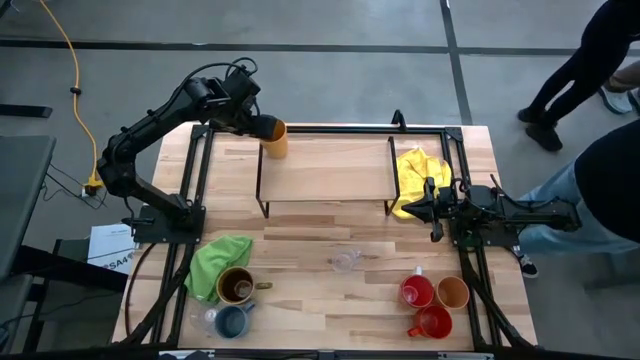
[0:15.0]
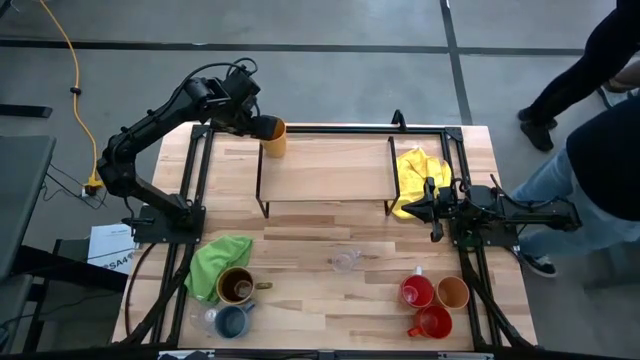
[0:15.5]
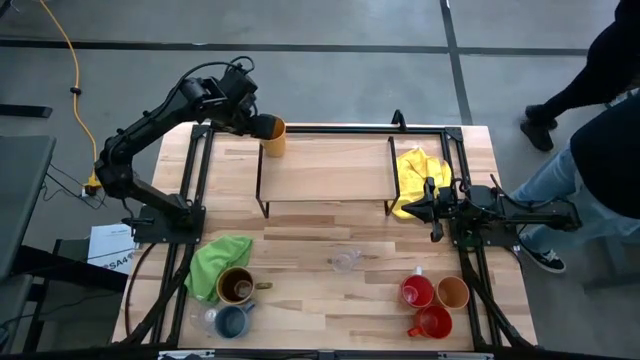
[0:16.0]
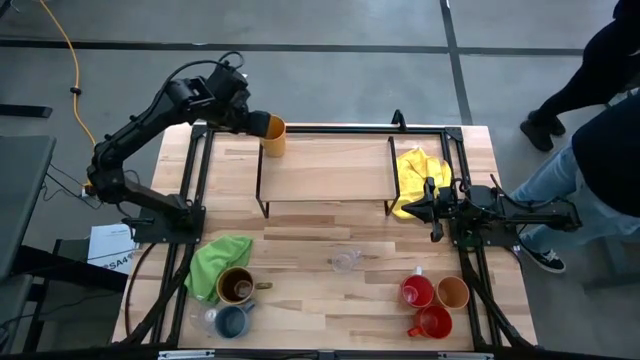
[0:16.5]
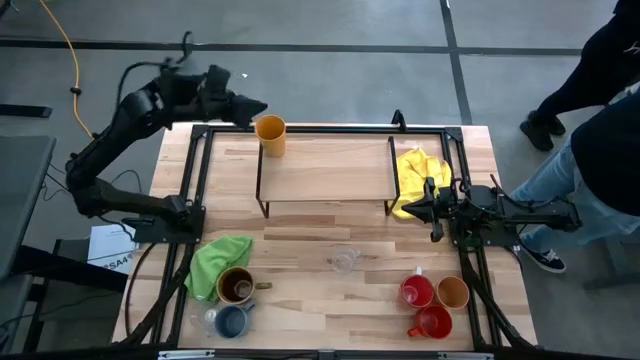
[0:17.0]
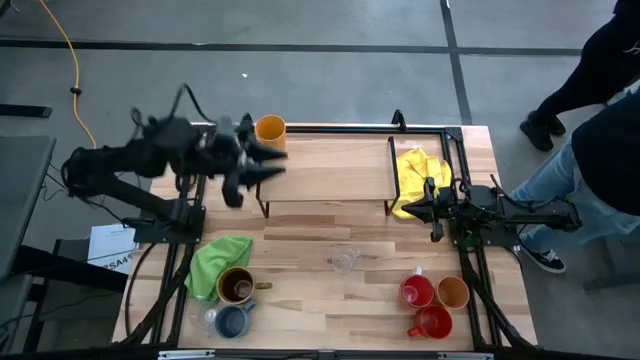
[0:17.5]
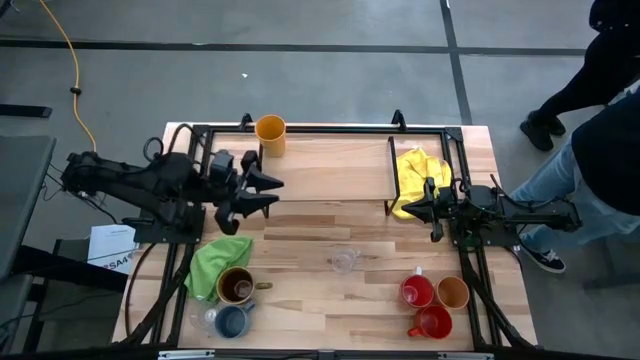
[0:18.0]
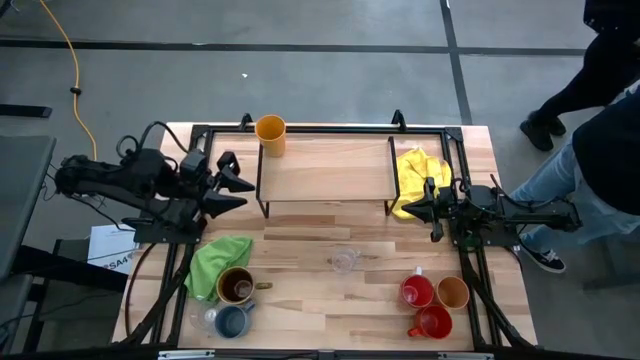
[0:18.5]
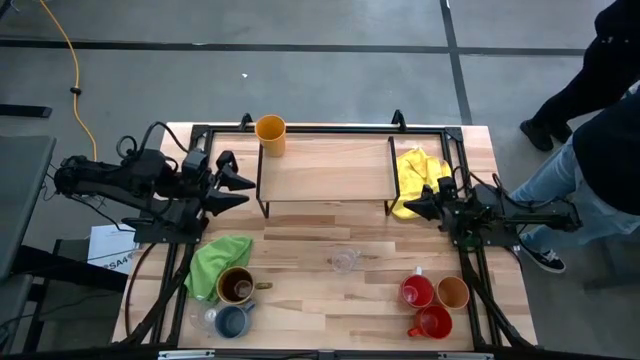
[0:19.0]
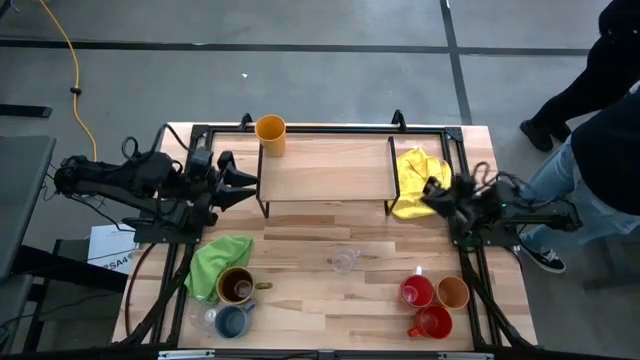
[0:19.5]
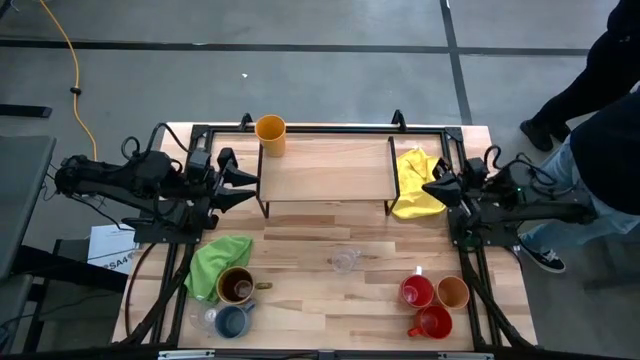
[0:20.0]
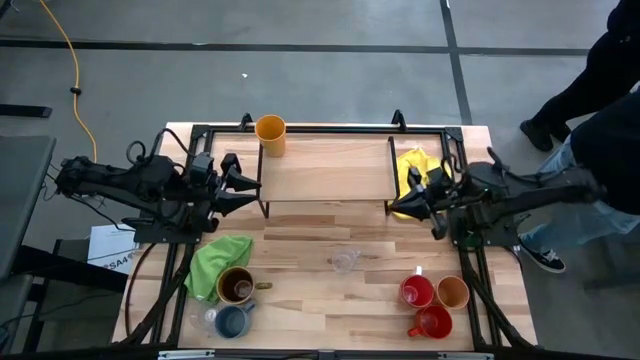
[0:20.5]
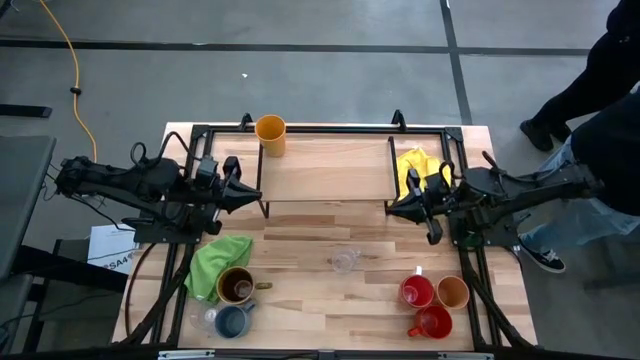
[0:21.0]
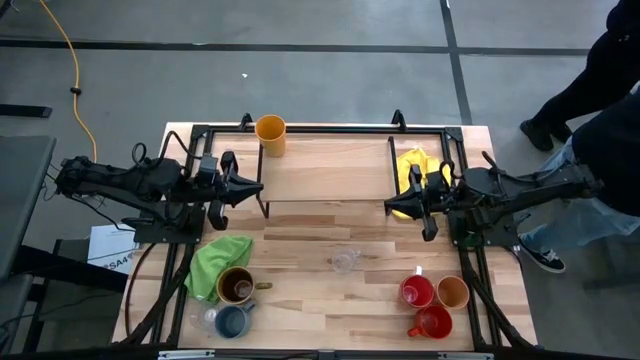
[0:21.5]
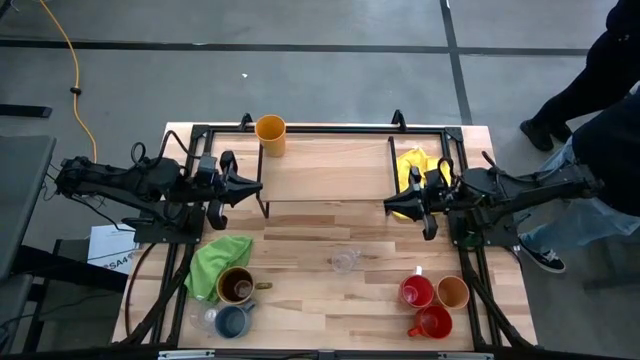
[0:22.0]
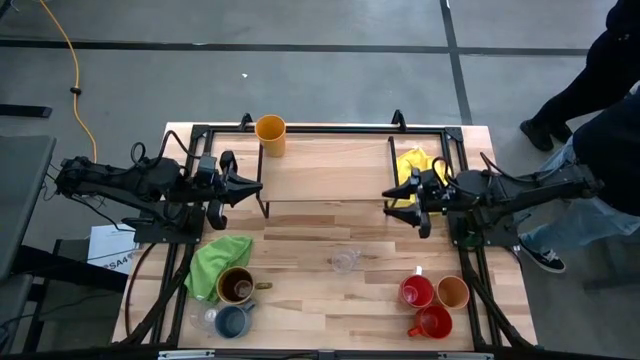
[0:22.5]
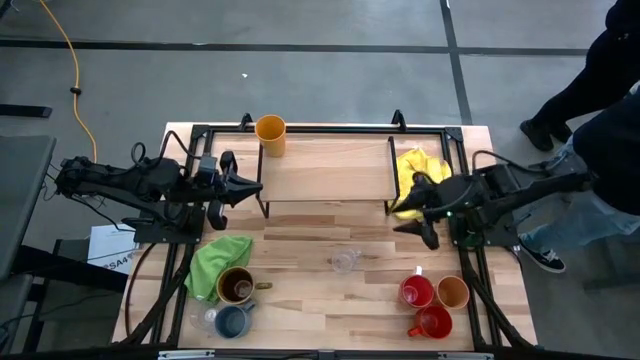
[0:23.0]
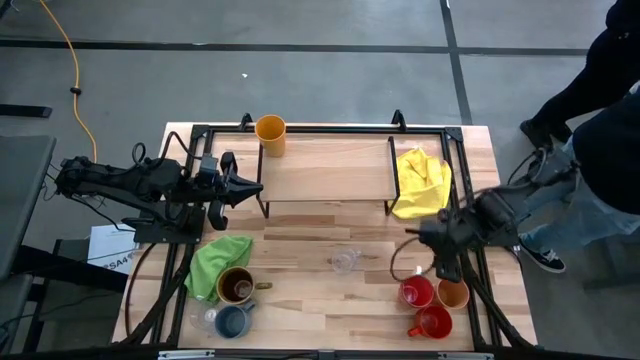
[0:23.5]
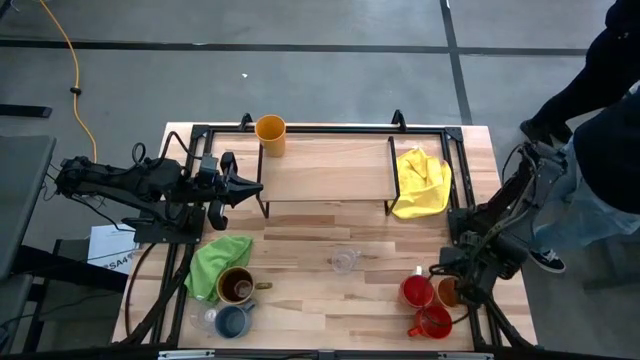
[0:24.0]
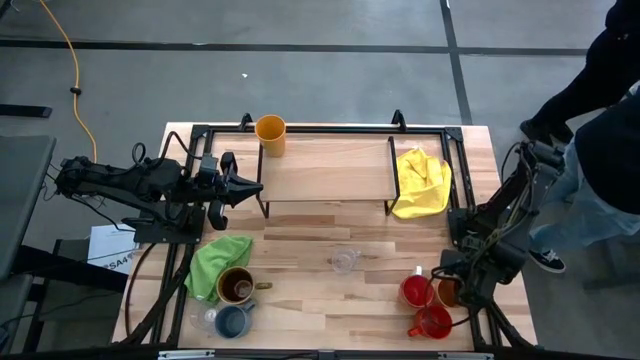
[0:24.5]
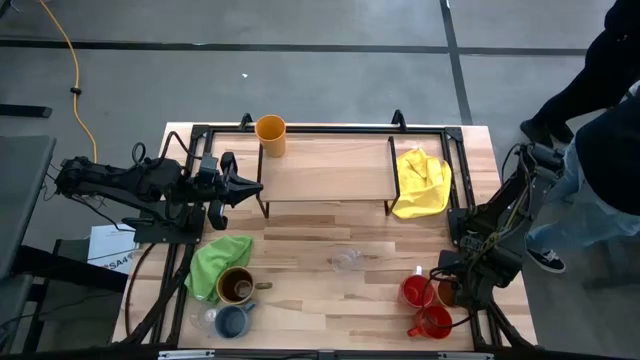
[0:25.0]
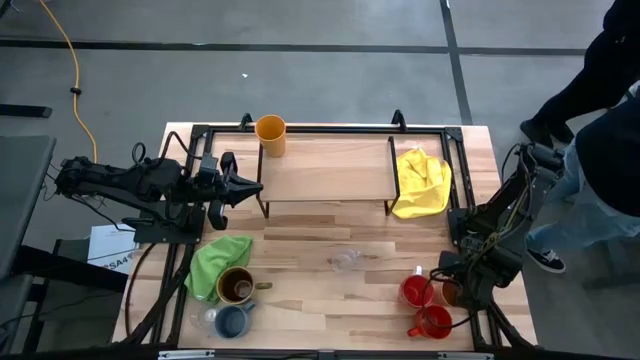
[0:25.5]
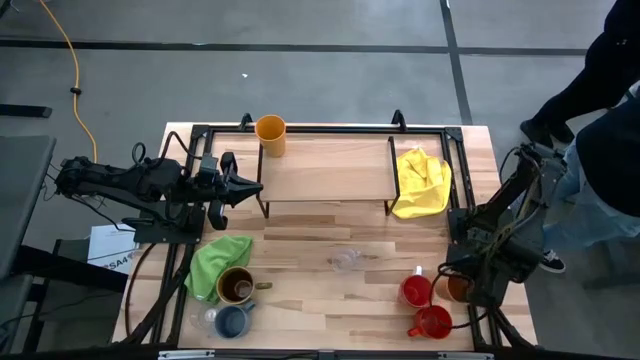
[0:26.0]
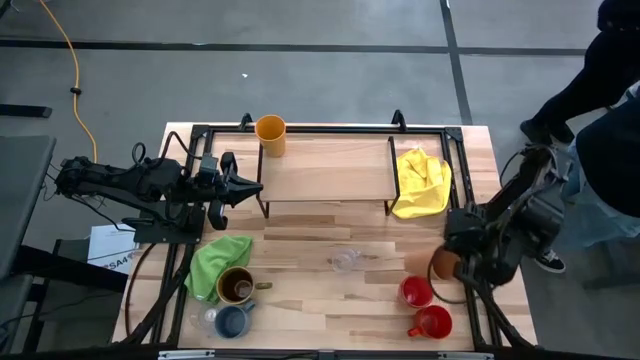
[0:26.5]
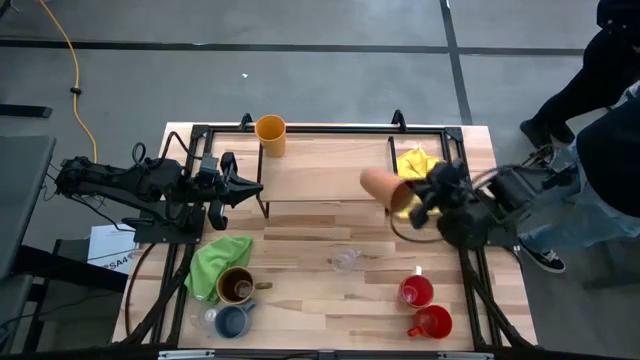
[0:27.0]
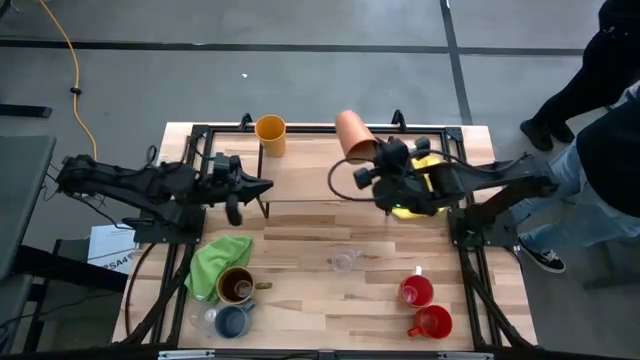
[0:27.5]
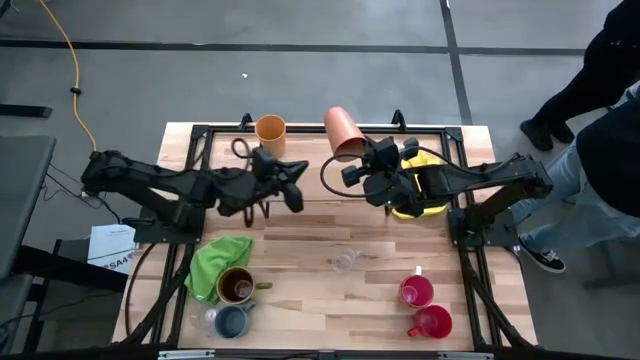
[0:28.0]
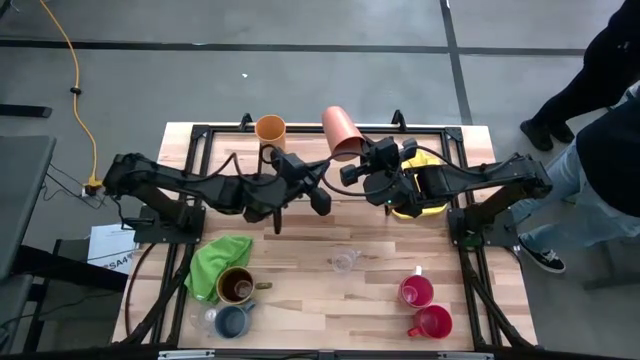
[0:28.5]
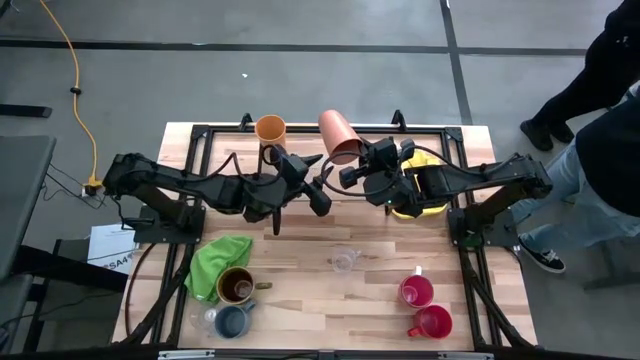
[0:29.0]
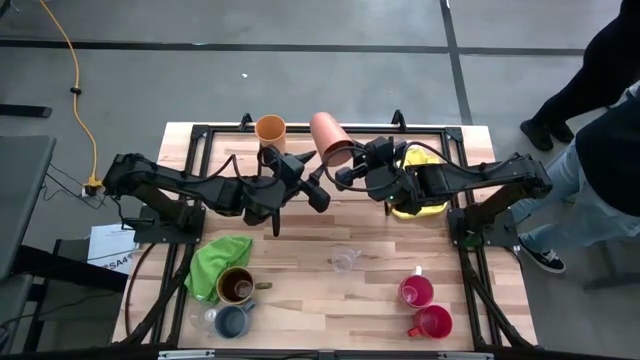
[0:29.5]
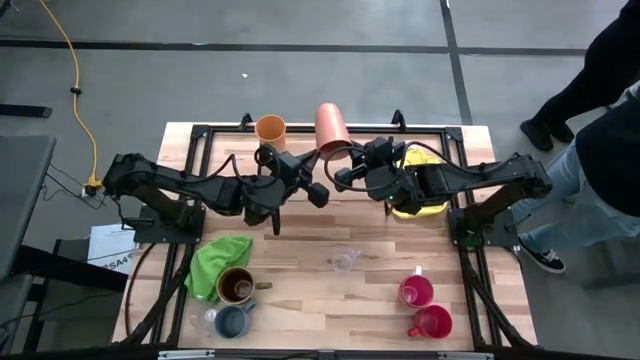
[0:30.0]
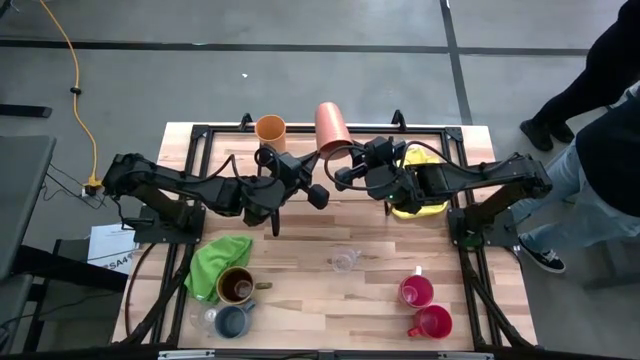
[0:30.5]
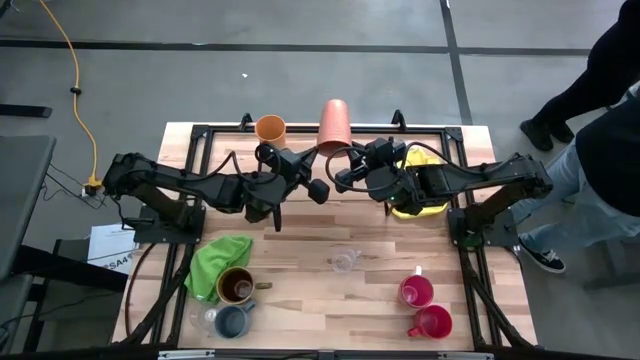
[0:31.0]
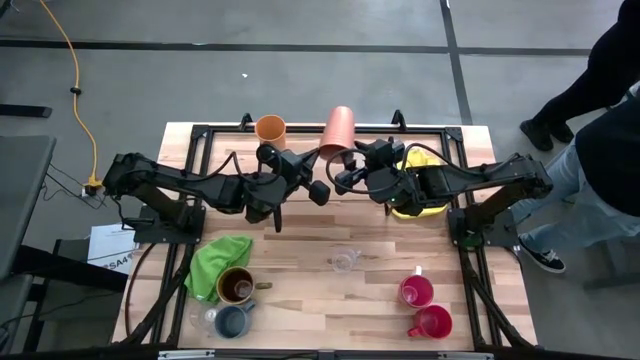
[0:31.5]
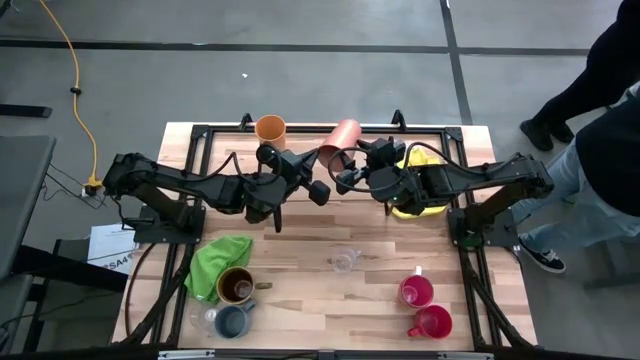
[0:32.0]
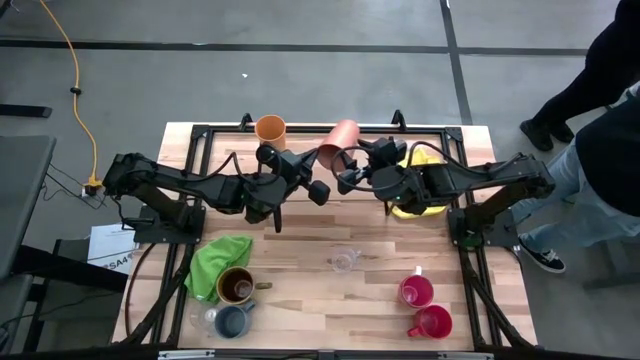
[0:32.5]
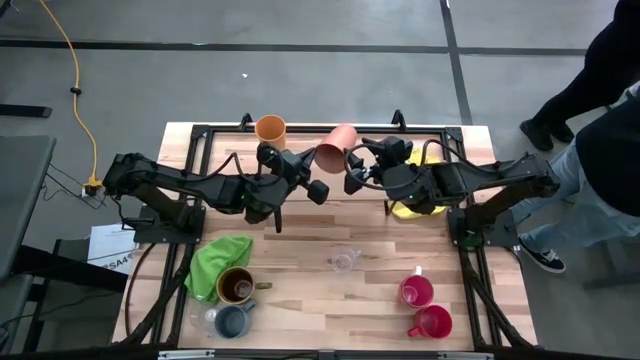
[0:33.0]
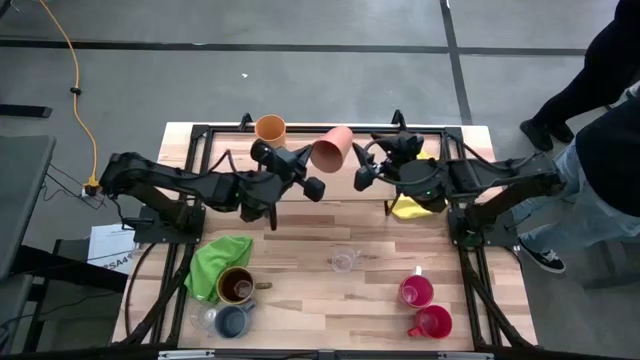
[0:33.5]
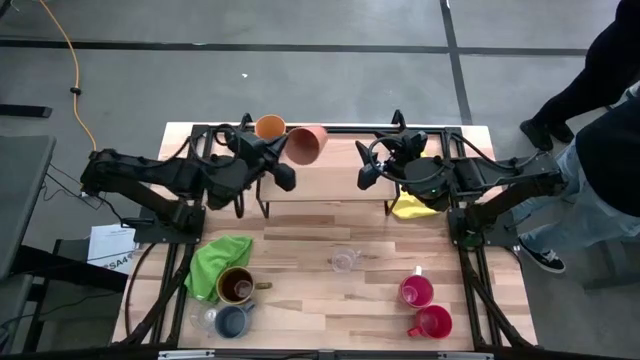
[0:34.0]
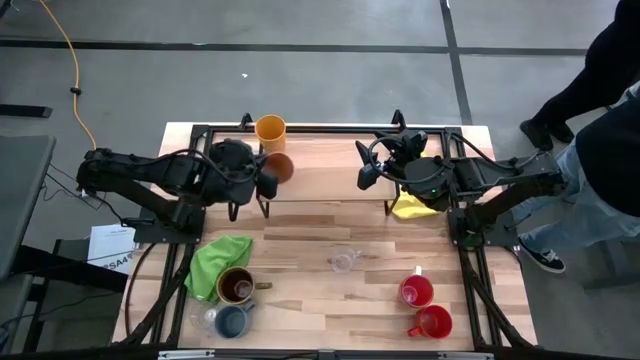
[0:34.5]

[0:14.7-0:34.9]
Task: Stack small to large cups/mugs on shelf
Put the orange cup on the shelf

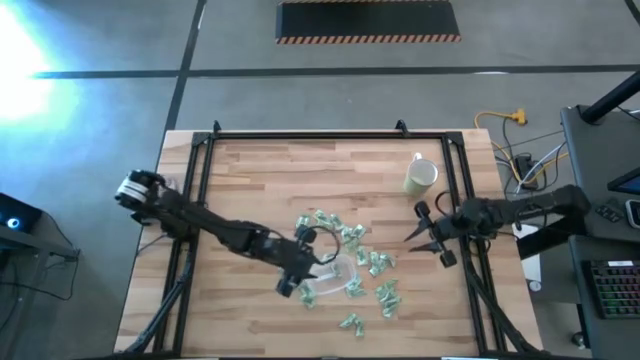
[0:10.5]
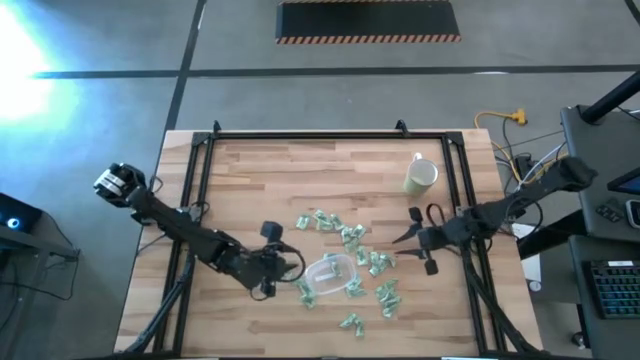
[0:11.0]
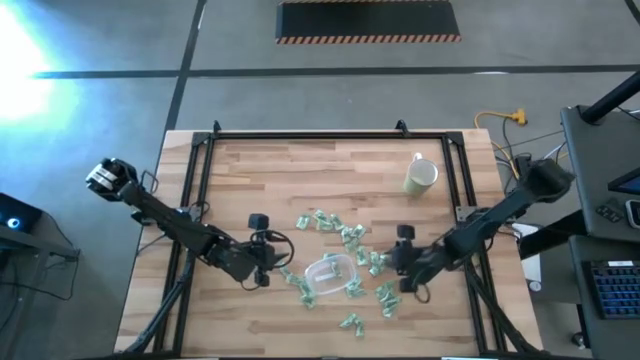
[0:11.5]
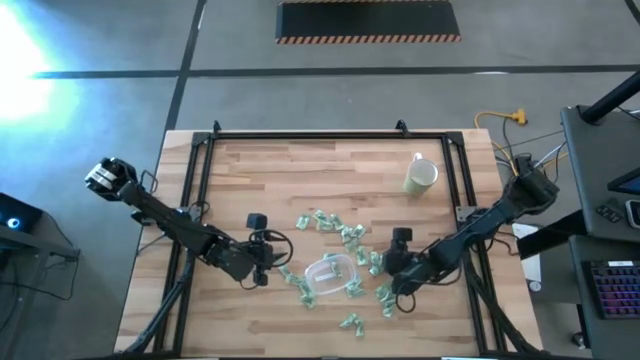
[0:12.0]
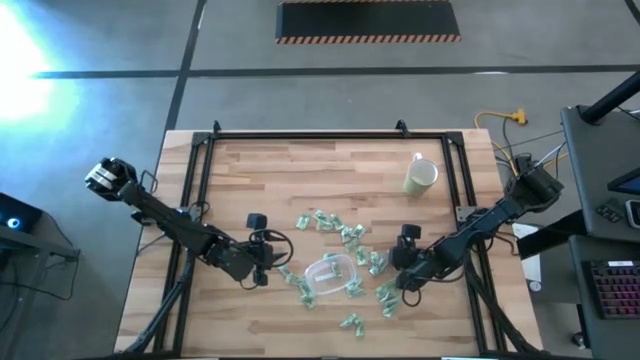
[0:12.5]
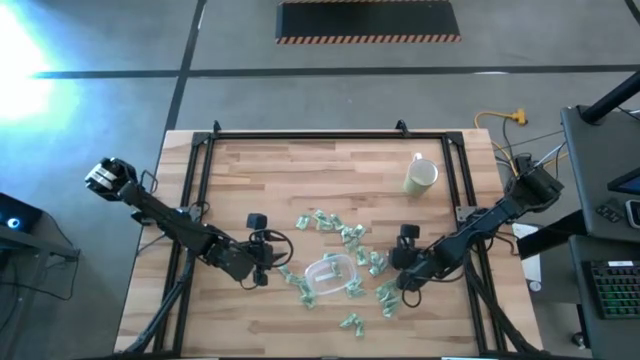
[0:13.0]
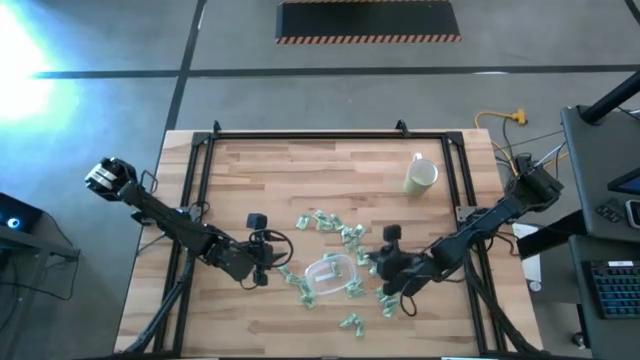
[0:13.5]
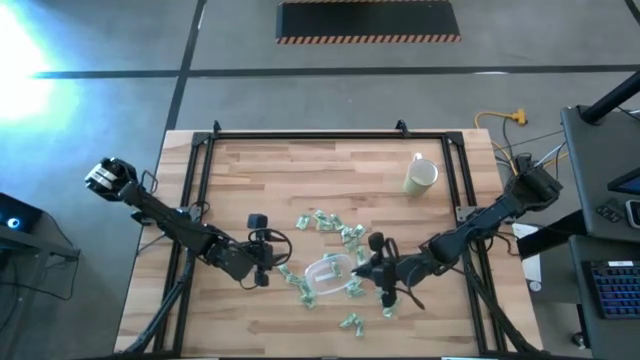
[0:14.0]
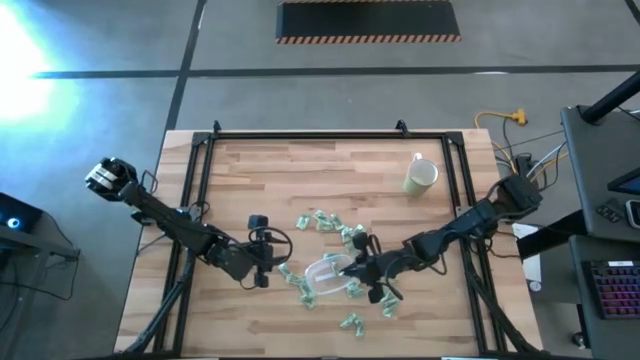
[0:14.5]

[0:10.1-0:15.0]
Task: Pick and place items into bin
Put the Stevia packet into the transparent bin
